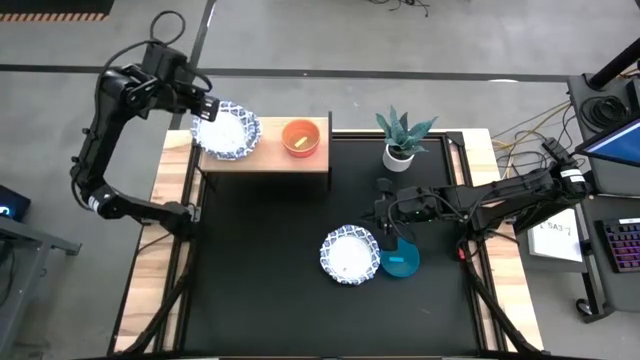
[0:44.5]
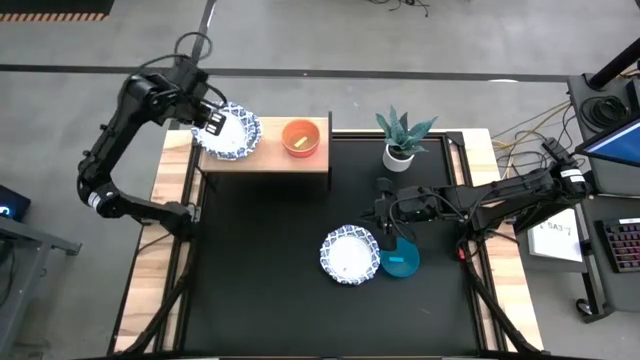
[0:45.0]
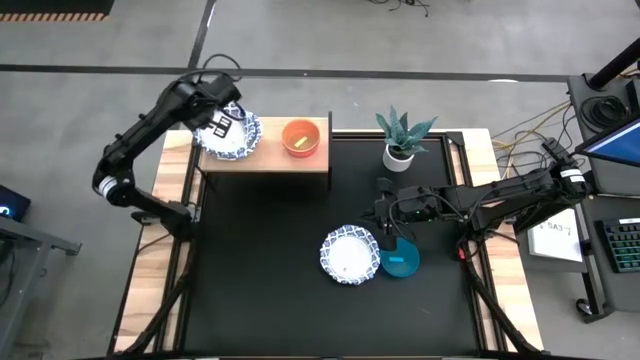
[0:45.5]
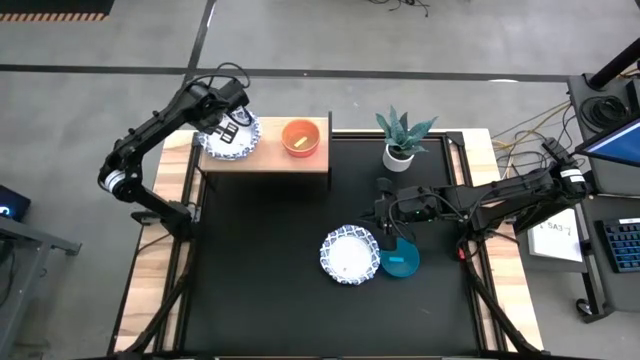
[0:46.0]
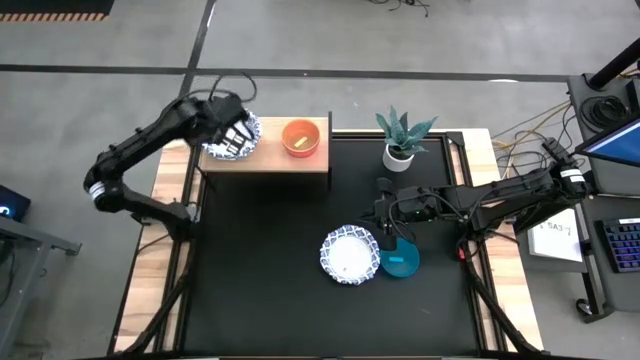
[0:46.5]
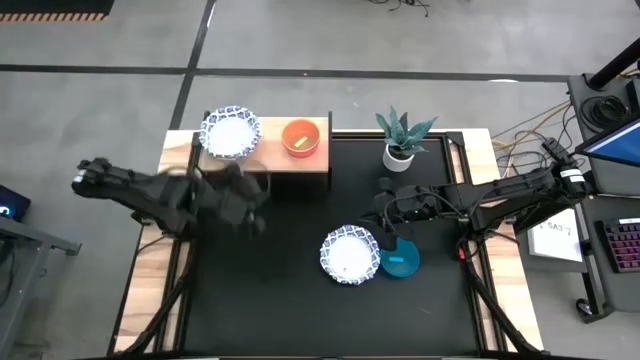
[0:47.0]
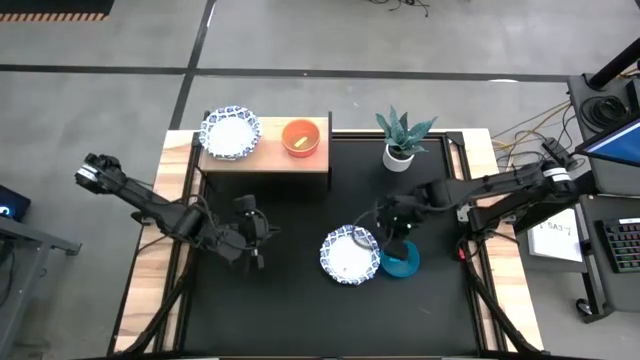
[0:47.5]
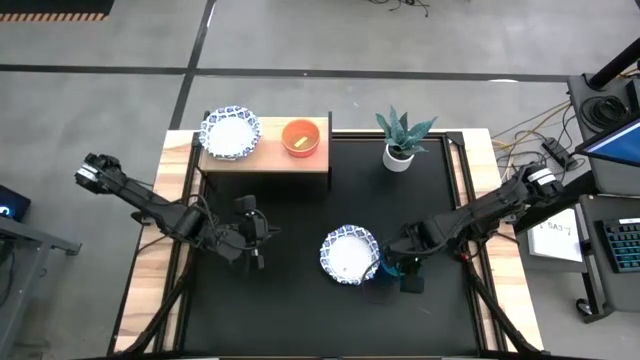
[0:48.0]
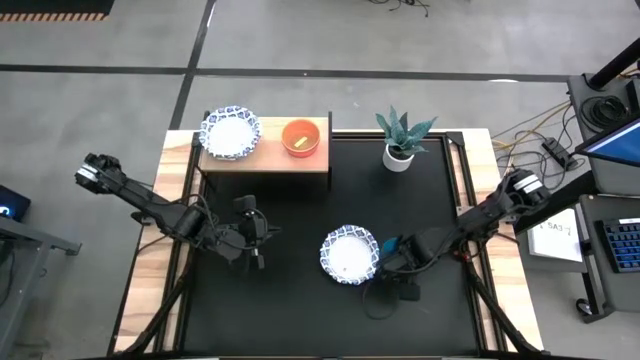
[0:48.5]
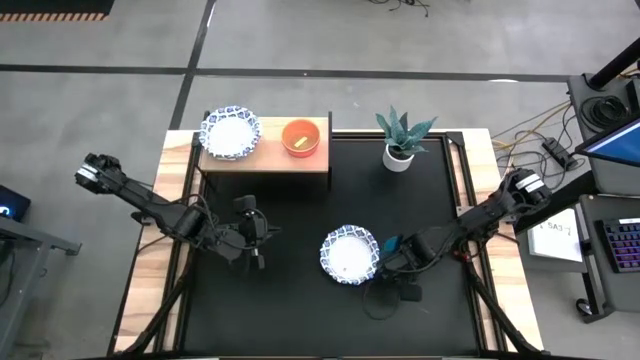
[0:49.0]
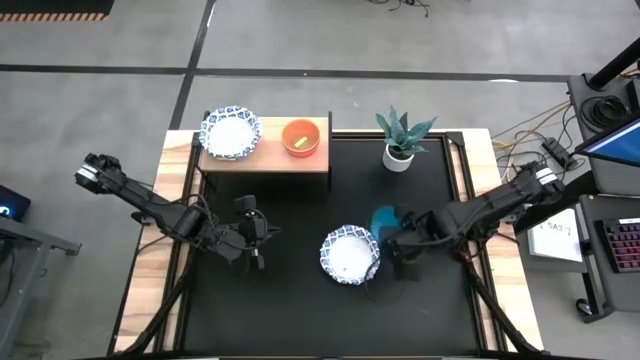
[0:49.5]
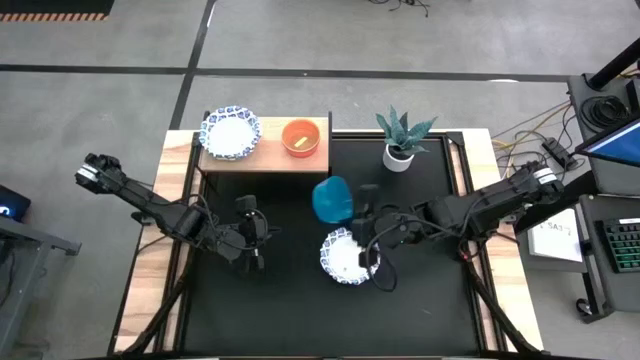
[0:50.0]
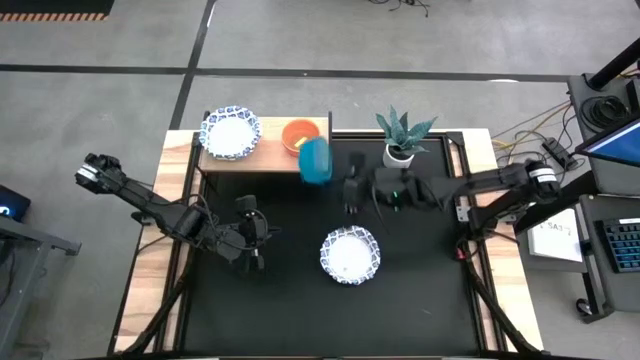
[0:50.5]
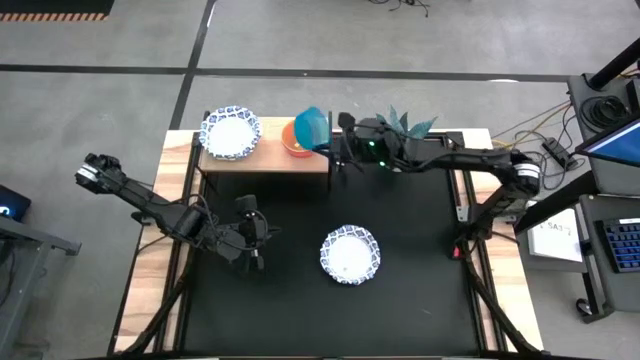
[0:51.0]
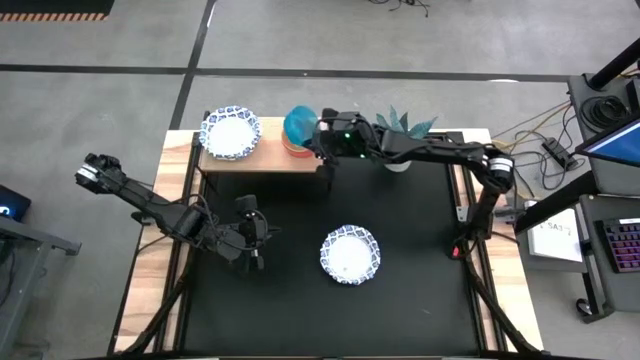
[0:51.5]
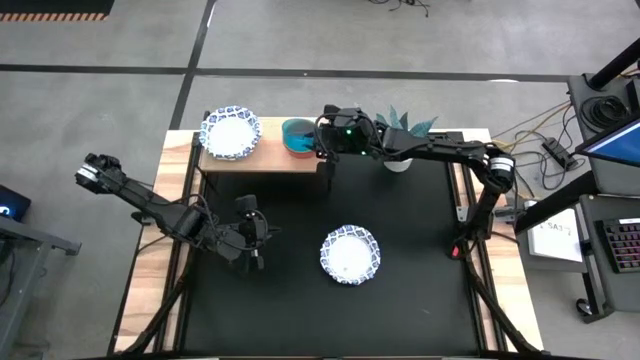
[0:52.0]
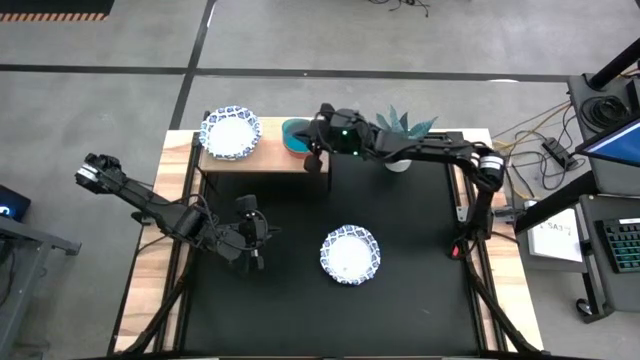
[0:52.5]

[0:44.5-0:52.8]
Task: Place and stack bowls onto a shelf
Stack the blue bowl on top of the yellow bowl on the shelf

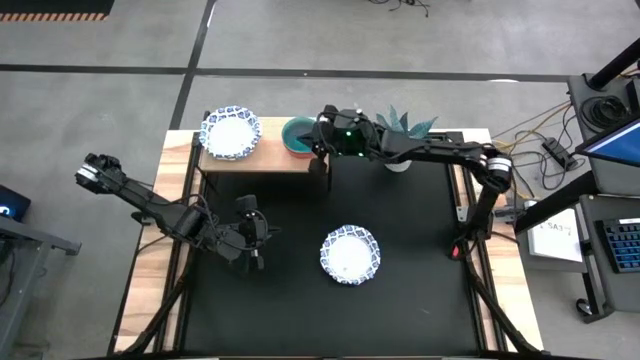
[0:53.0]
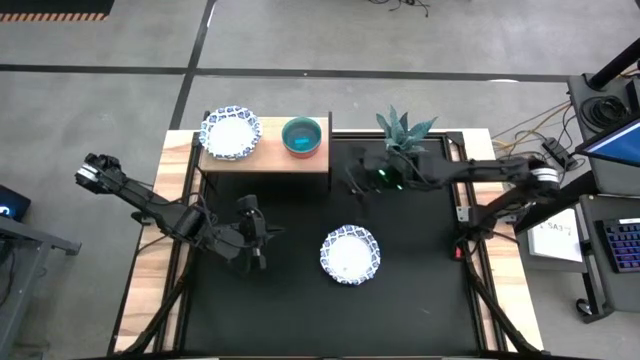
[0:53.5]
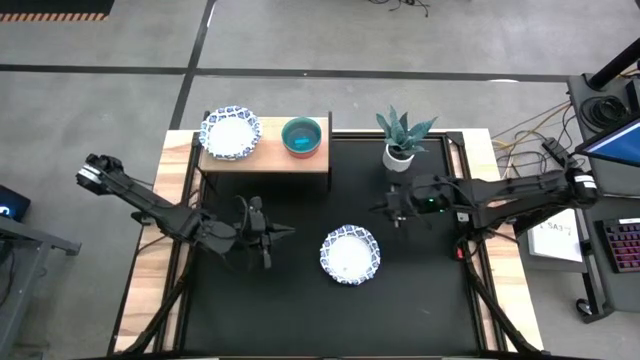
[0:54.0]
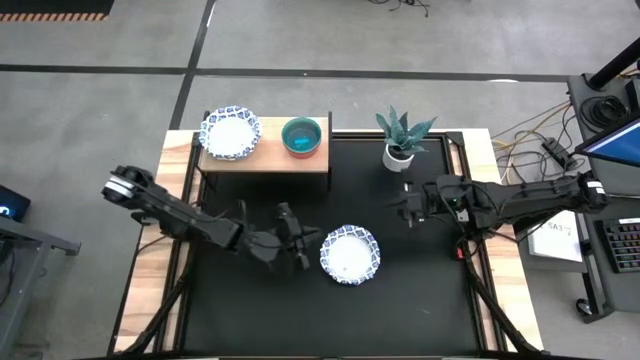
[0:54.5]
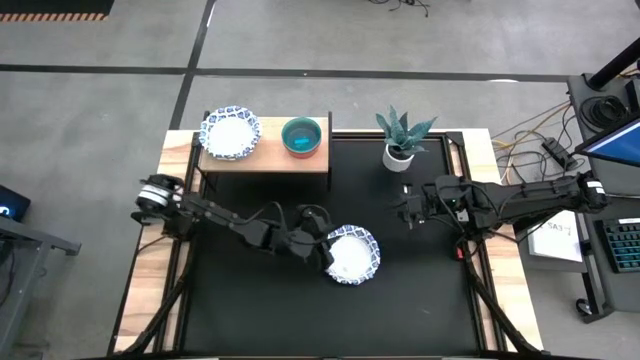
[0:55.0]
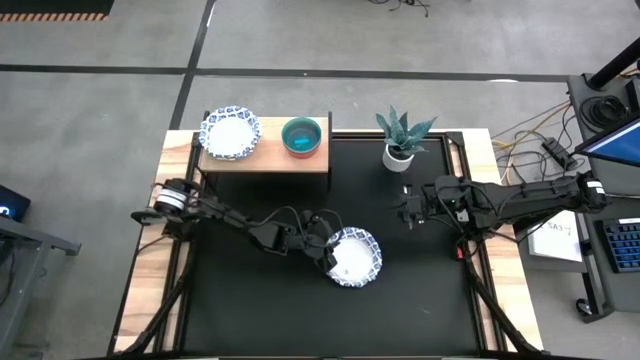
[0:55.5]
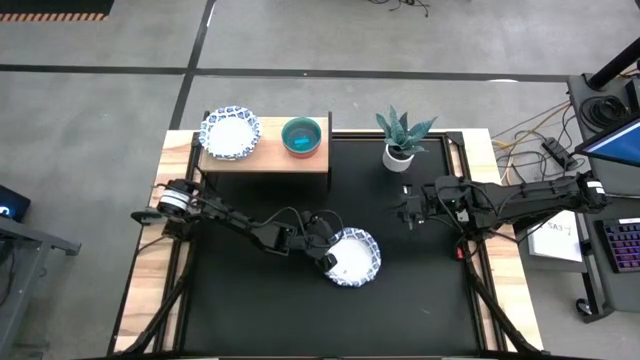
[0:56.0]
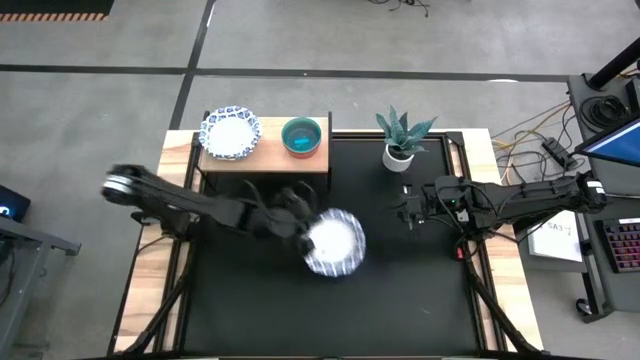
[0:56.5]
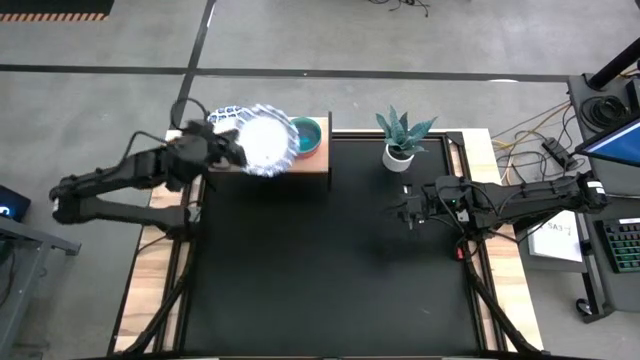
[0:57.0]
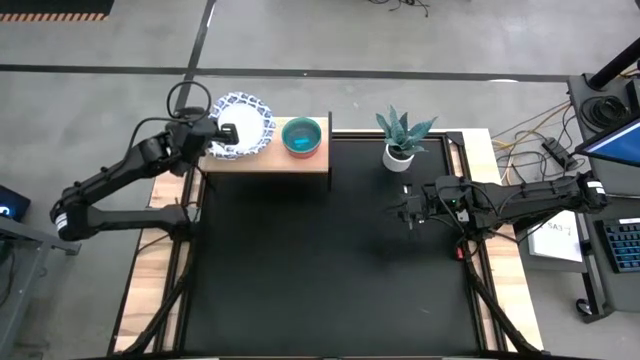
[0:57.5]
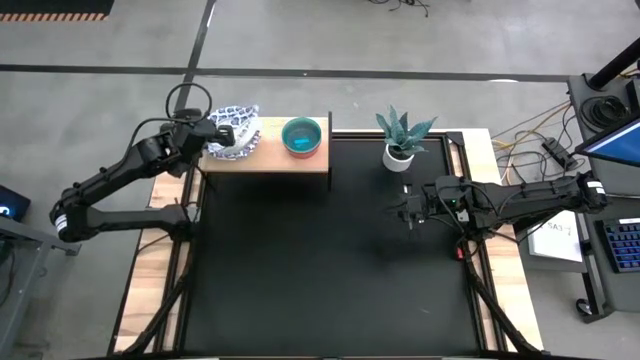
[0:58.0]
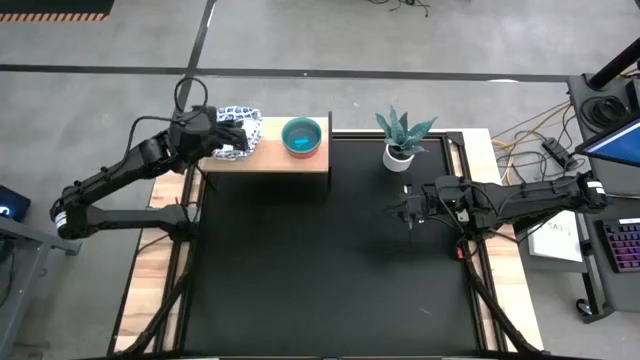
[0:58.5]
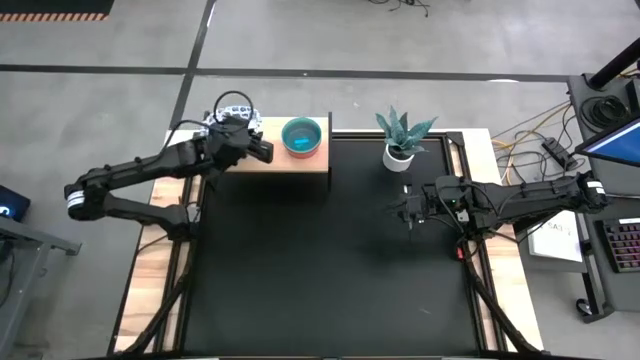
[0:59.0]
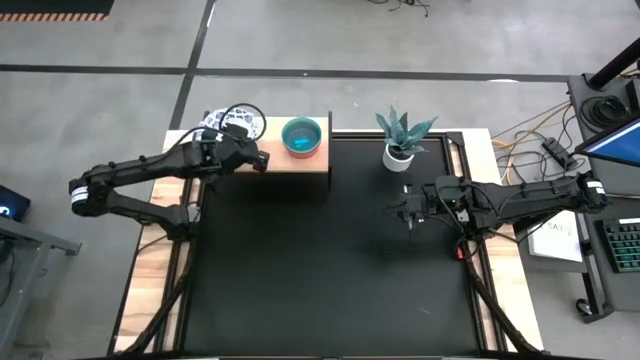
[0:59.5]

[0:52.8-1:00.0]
Stack the blue bowl on top of the blue bowl on the shelf

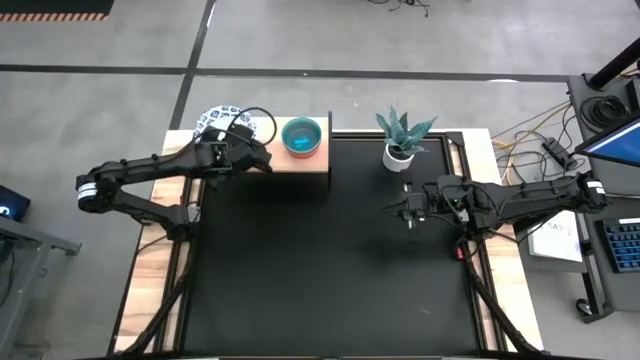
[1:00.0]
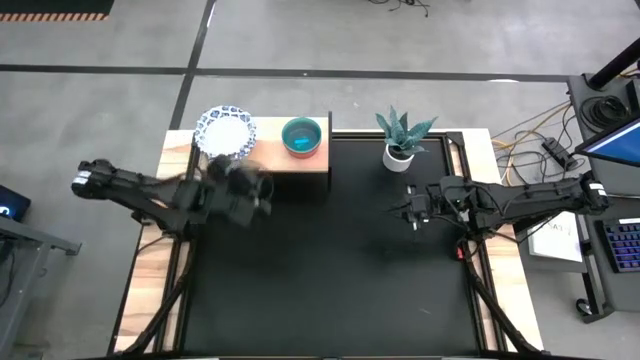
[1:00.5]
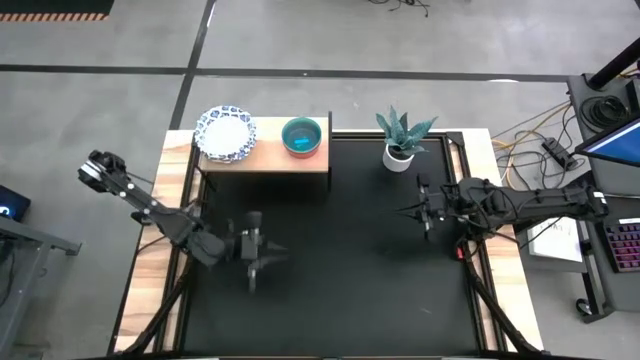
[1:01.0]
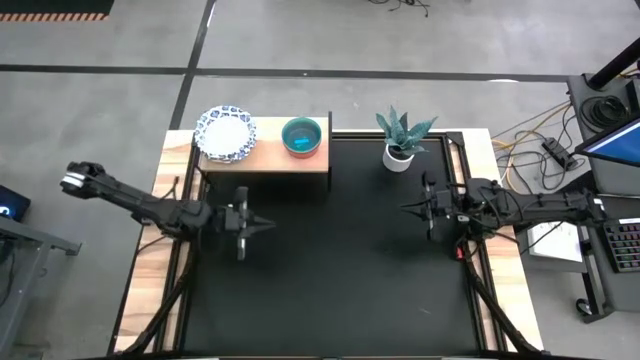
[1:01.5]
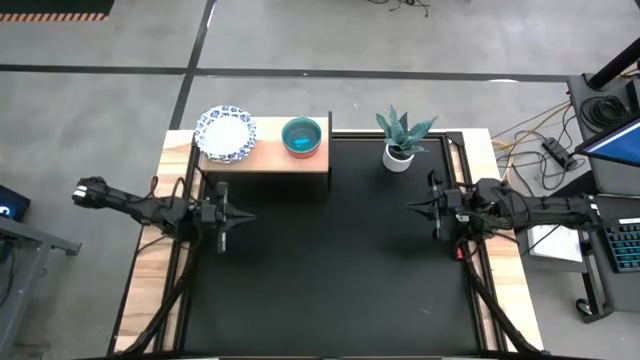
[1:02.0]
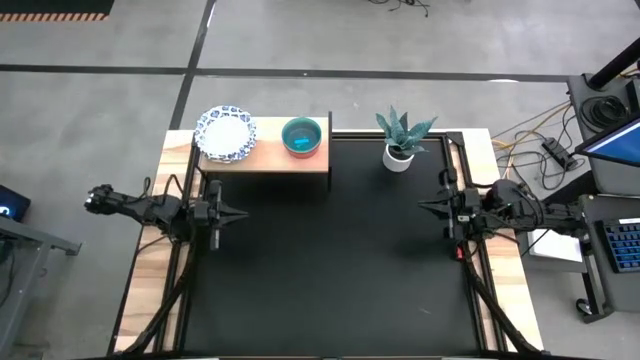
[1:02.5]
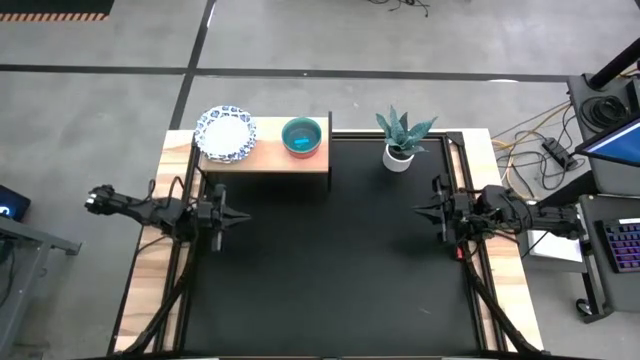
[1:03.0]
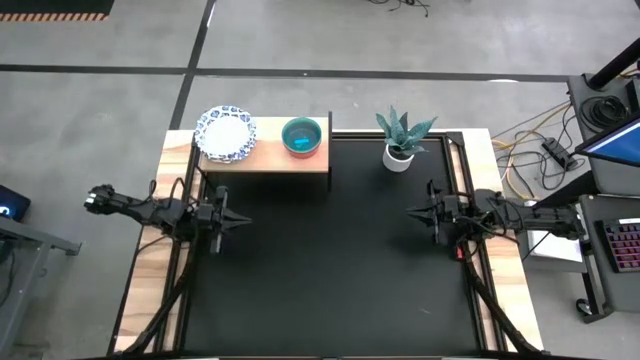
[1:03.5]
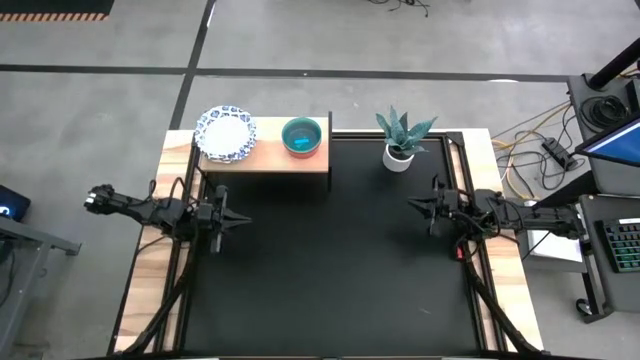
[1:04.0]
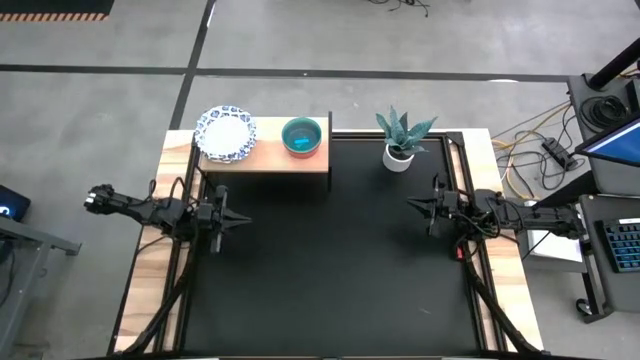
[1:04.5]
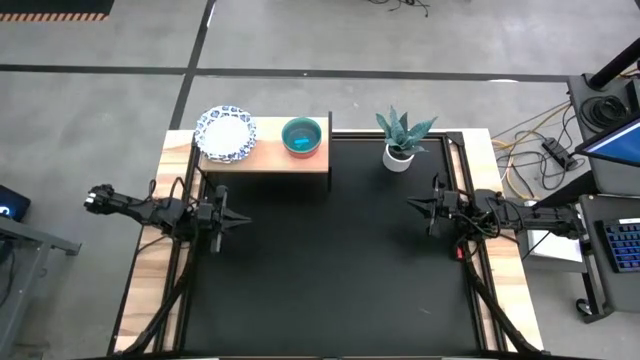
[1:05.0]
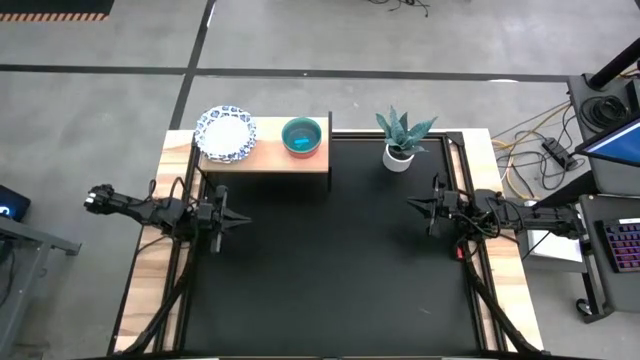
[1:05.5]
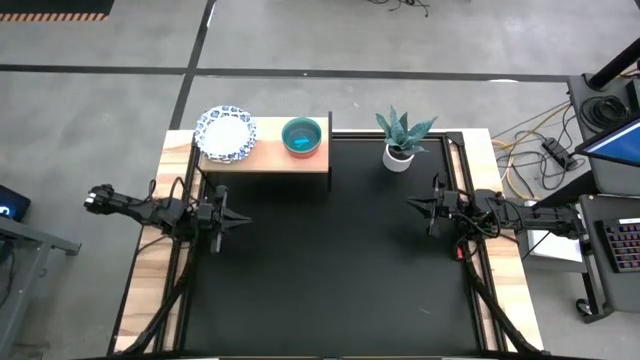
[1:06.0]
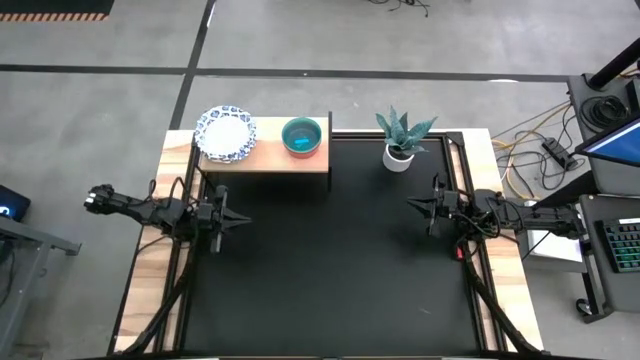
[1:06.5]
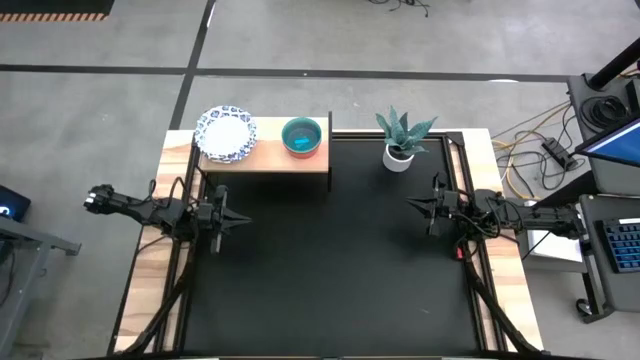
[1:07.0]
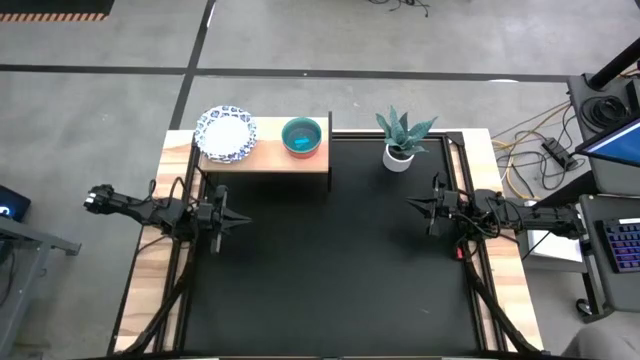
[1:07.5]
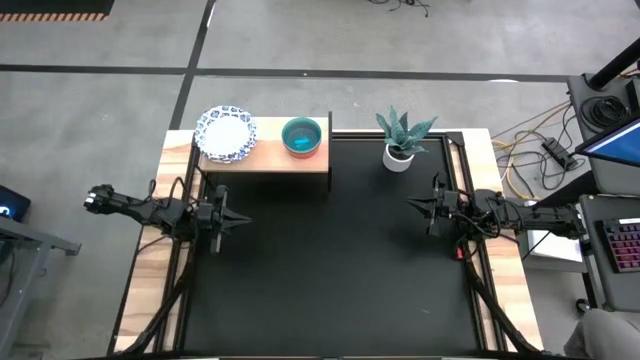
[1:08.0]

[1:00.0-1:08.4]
Return to Home Position
